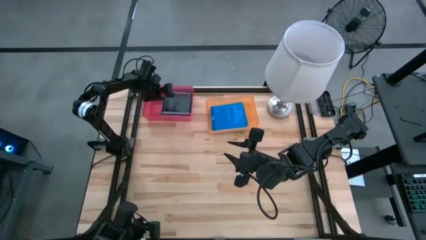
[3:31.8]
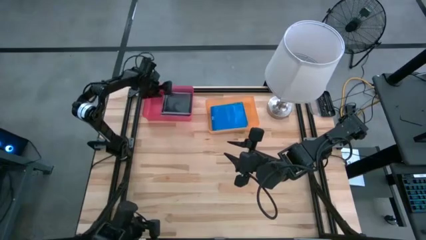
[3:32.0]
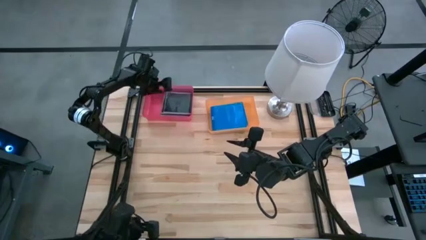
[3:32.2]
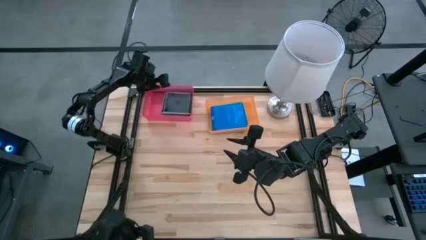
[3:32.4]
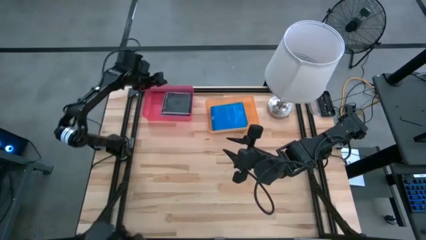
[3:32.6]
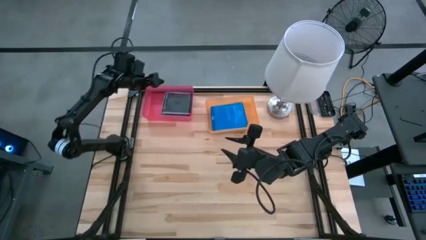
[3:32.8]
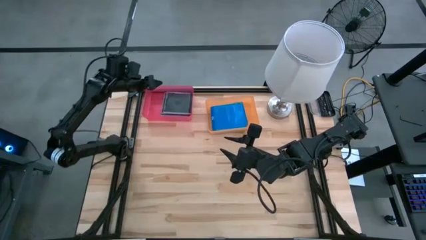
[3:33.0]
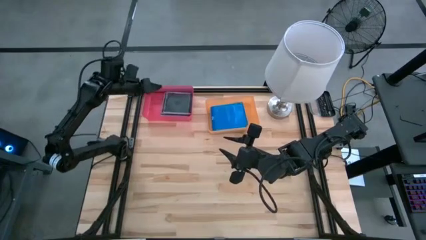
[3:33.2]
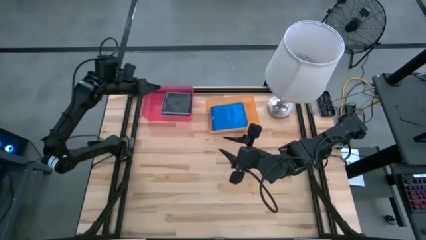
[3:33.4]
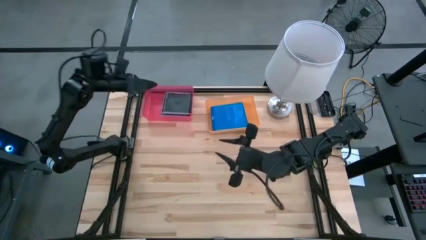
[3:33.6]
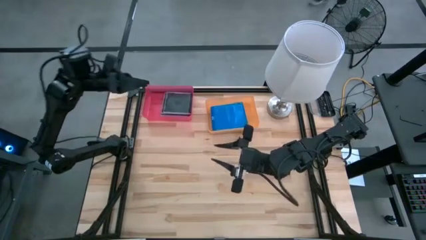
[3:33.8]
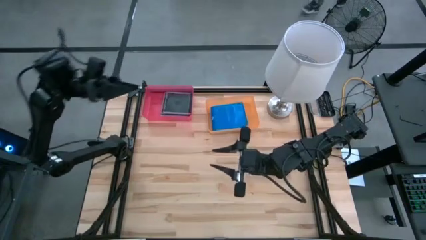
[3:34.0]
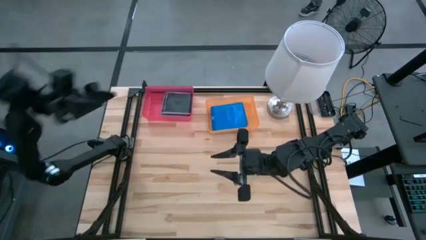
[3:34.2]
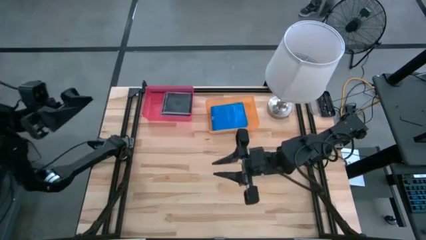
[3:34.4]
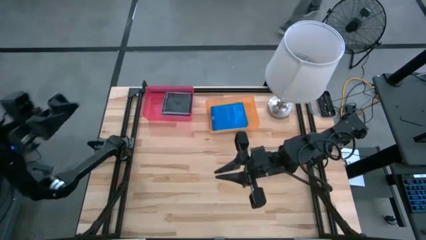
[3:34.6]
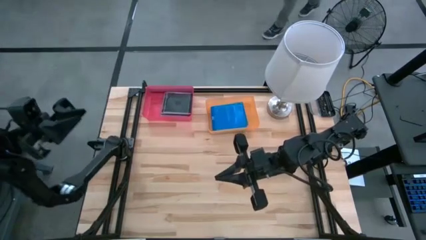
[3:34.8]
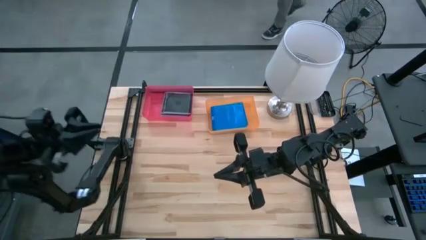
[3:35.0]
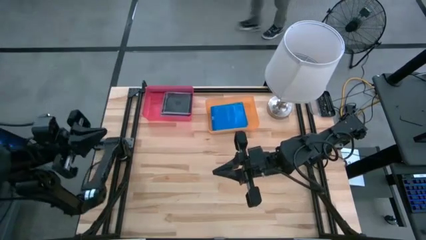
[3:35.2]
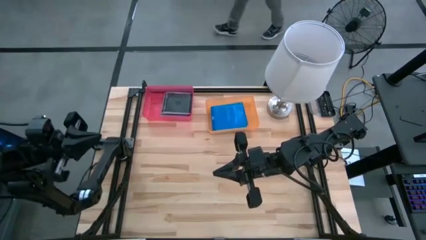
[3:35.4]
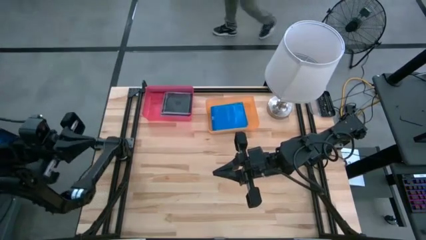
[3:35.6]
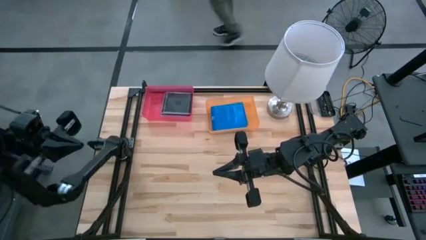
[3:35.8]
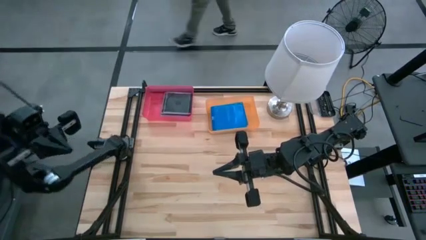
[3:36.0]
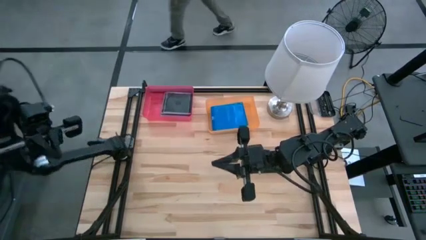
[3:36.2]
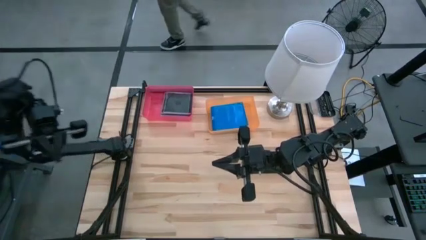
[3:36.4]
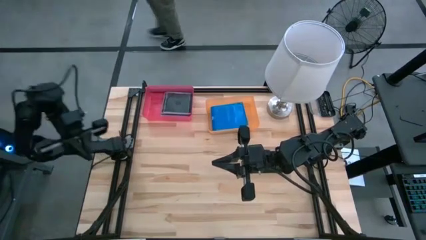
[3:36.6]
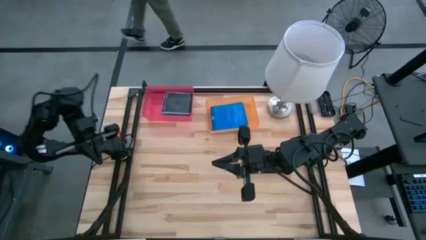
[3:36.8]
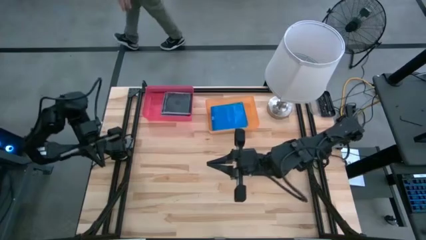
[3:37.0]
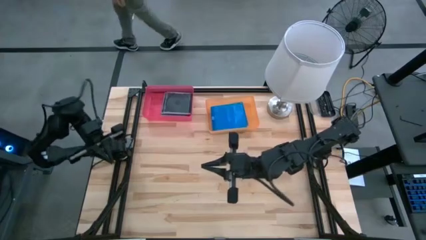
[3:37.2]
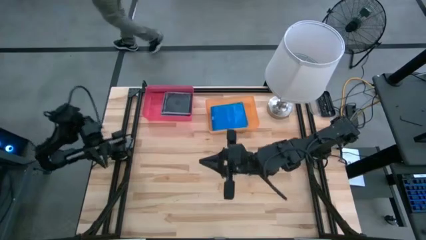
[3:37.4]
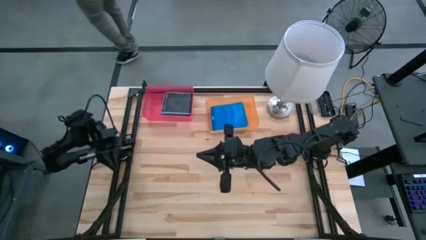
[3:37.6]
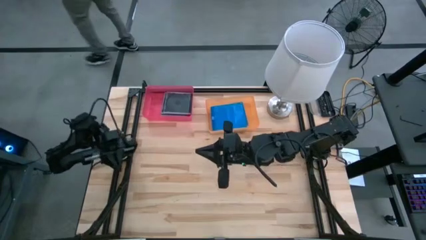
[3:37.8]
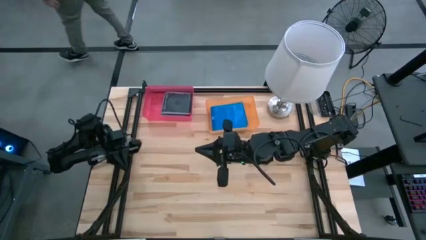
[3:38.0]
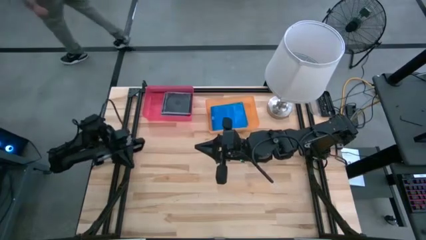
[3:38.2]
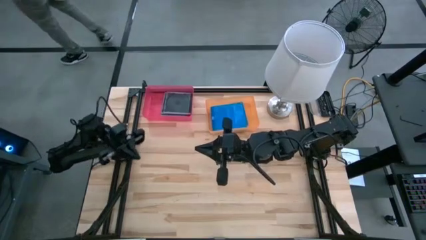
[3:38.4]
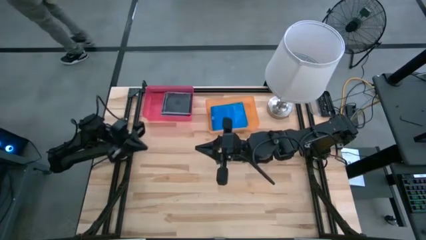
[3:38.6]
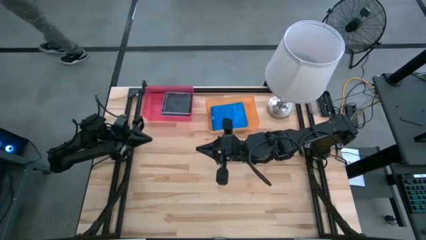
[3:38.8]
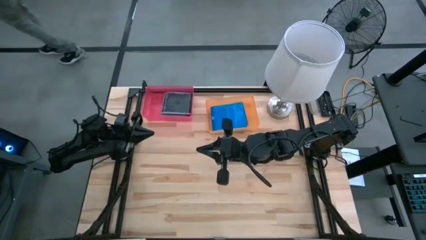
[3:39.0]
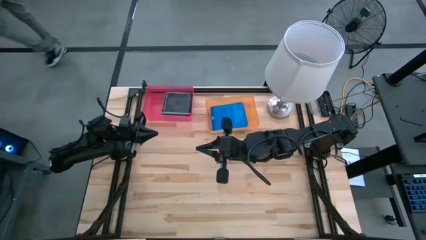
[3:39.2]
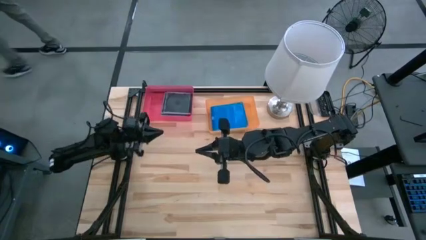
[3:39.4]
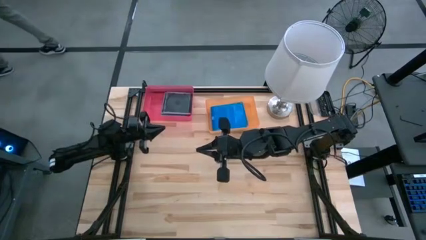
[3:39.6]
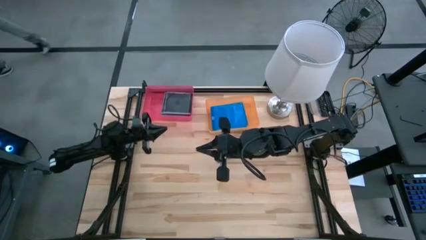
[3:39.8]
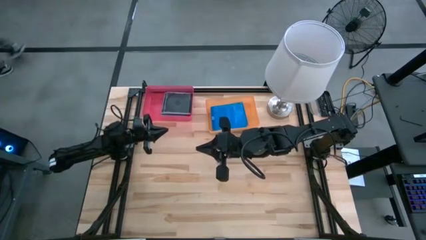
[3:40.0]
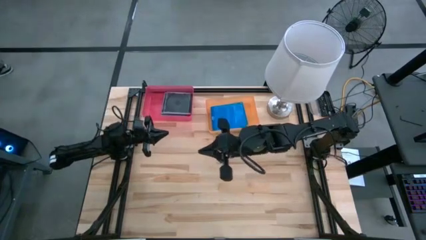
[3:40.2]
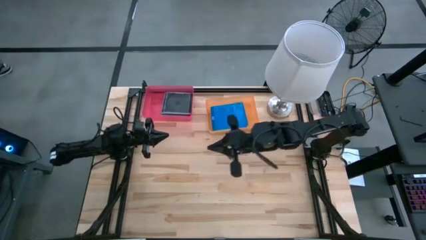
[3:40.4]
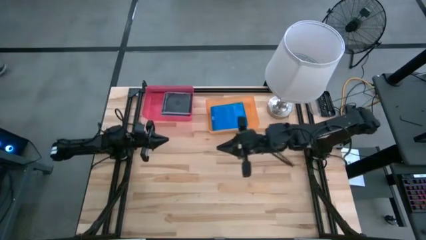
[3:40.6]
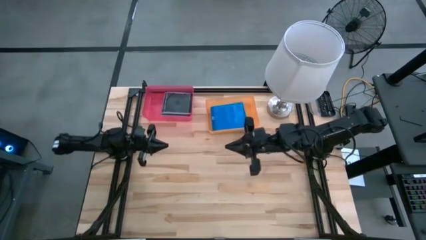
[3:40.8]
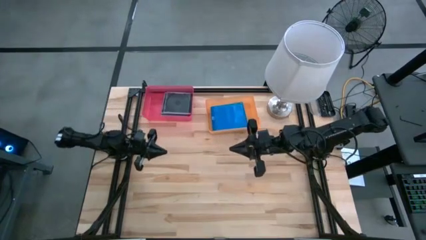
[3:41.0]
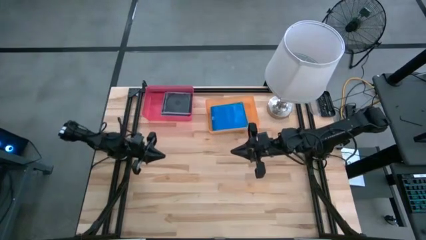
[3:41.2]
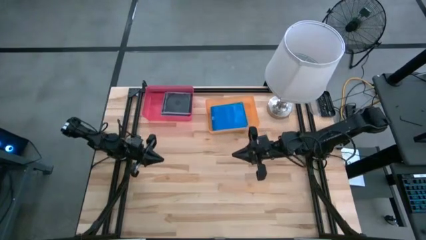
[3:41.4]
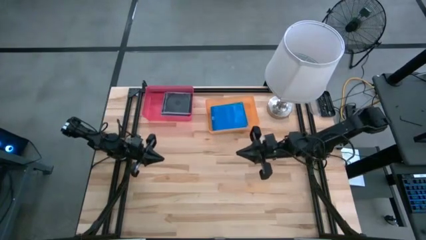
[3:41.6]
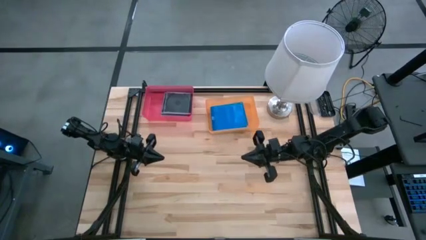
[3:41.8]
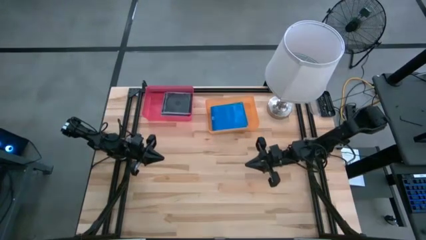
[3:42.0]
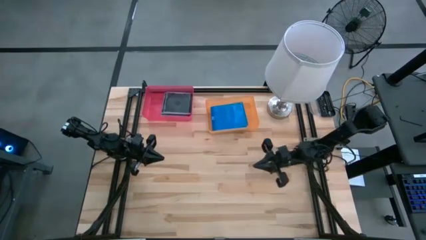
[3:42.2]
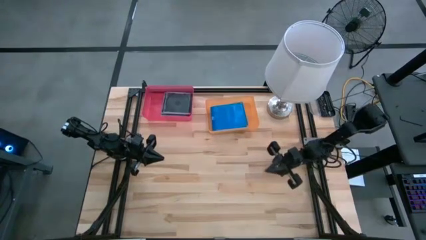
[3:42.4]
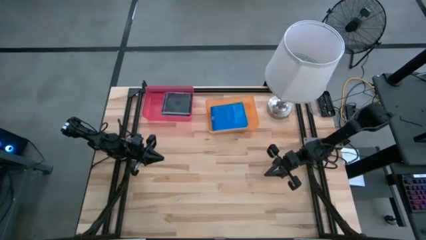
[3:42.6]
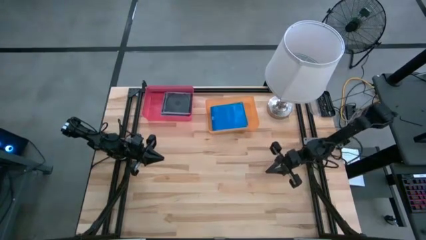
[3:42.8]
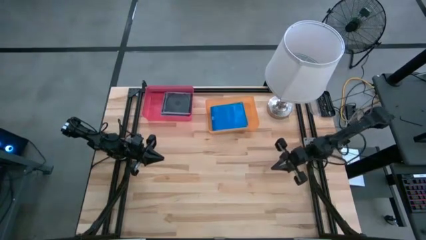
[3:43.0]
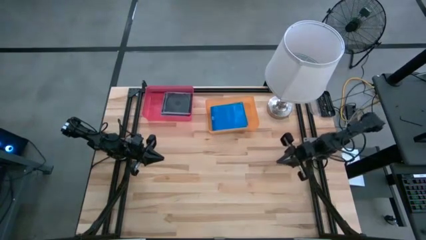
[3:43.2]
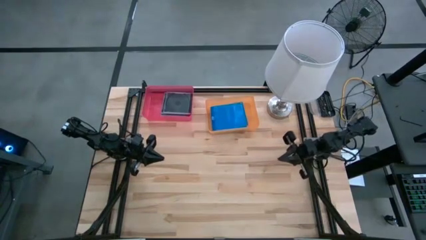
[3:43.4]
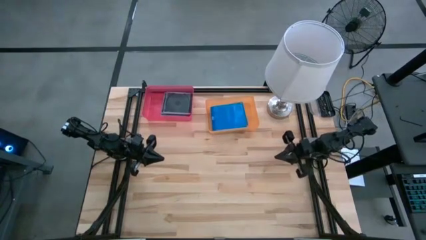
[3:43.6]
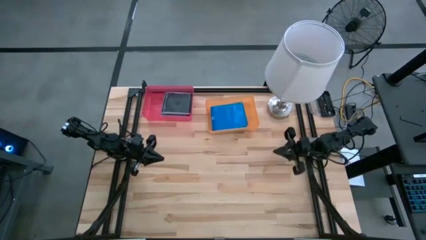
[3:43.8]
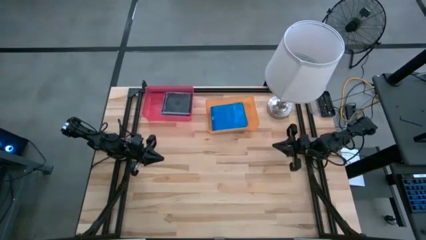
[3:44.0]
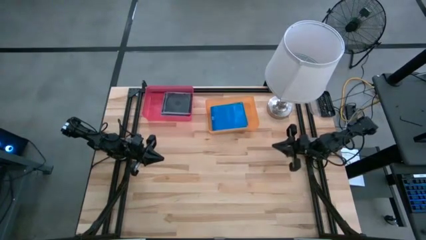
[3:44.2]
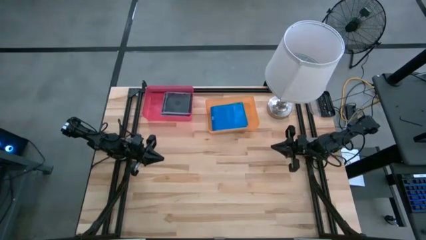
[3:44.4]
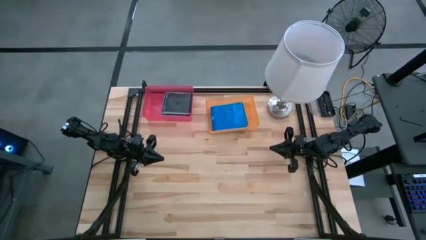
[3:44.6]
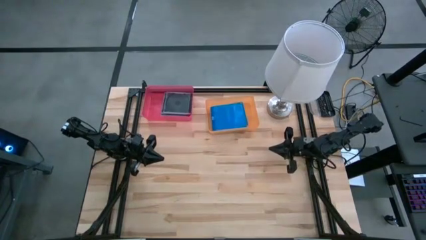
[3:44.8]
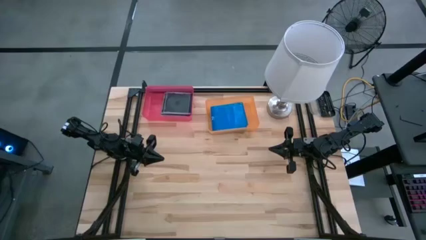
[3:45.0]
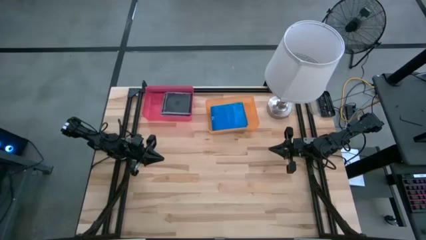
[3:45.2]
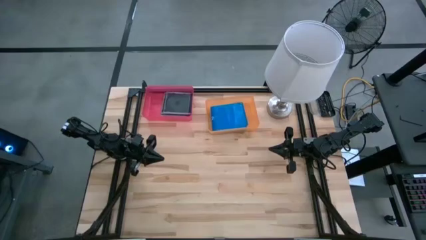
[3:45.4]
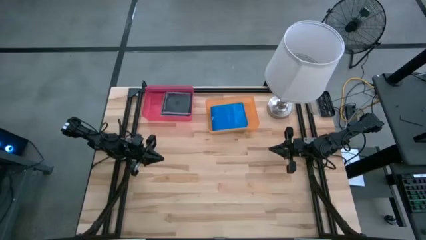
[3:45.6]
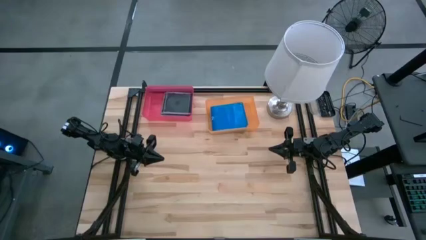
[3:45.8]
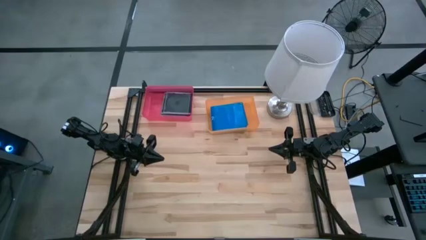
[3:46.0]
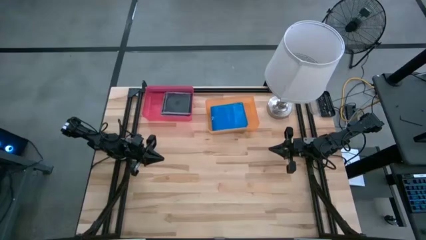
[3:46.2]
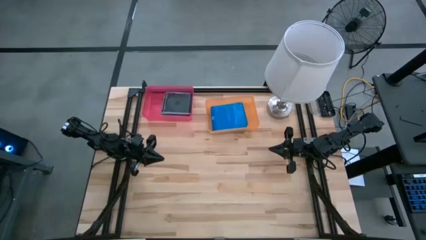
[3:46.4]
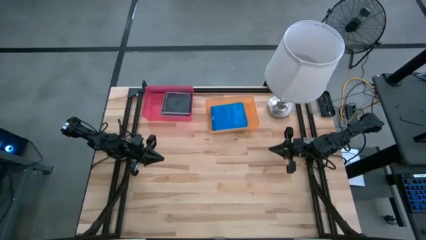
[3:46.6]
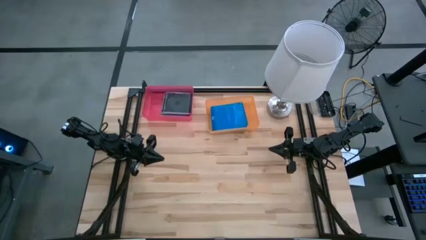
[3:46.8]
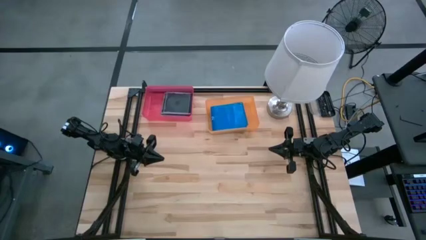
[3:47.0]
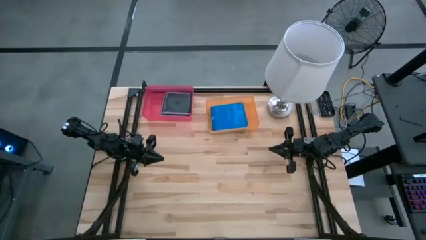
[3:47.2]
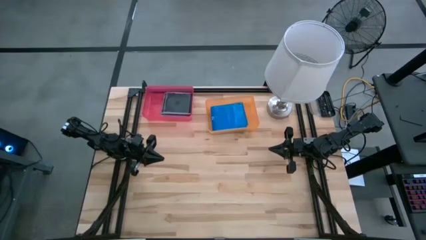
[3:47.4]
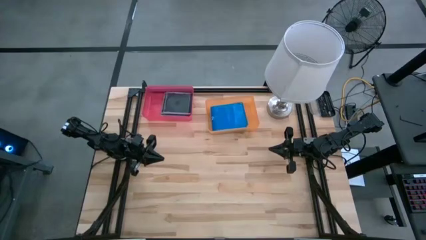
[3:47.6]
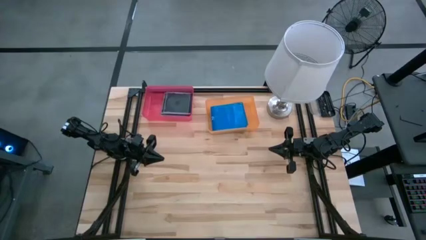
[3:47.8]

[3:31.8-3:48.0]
Task: Pick & place jewel cases by type
Return to Home Position
